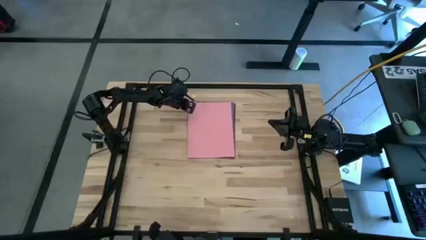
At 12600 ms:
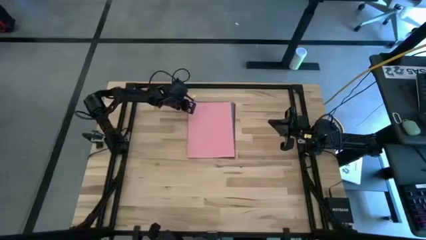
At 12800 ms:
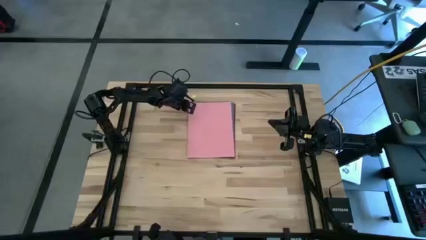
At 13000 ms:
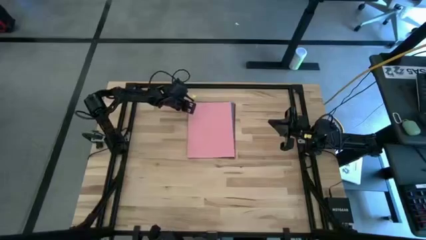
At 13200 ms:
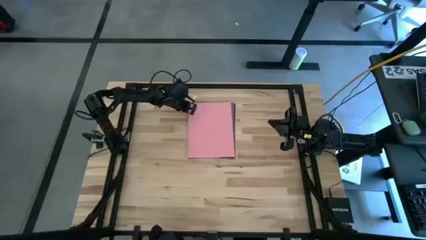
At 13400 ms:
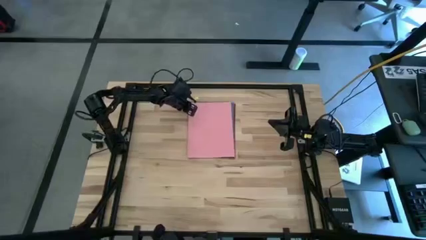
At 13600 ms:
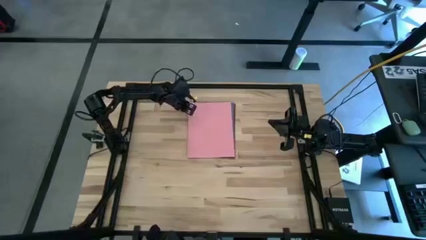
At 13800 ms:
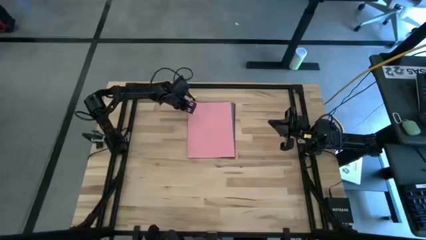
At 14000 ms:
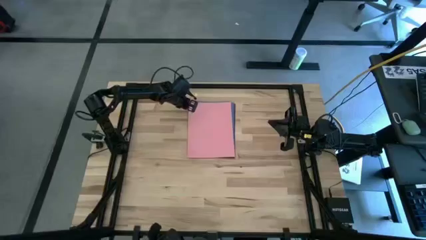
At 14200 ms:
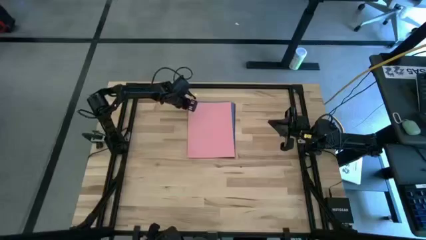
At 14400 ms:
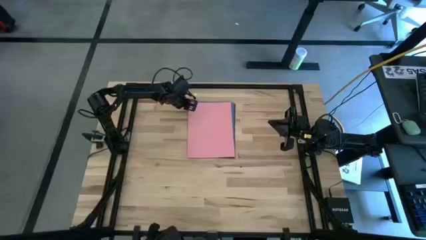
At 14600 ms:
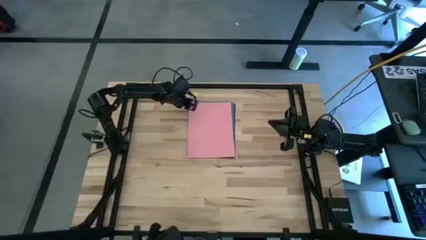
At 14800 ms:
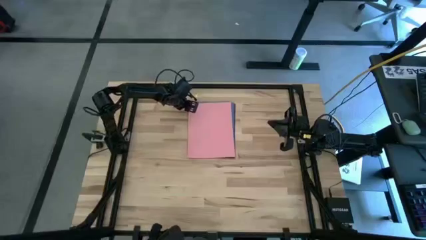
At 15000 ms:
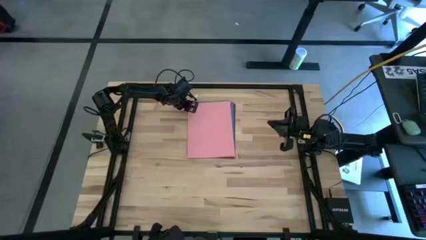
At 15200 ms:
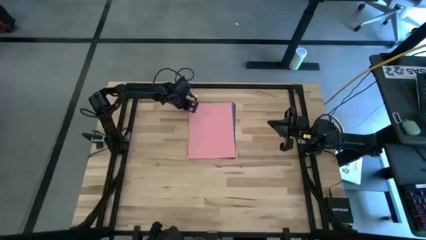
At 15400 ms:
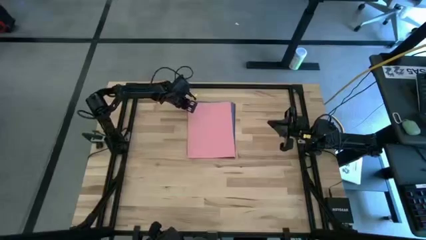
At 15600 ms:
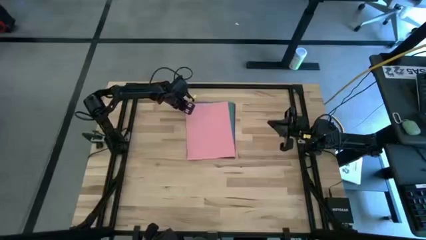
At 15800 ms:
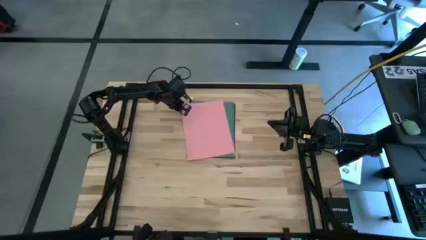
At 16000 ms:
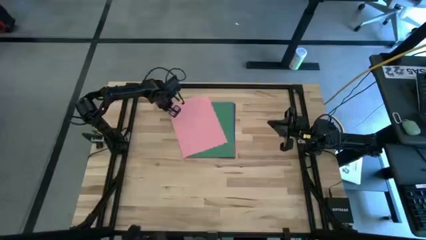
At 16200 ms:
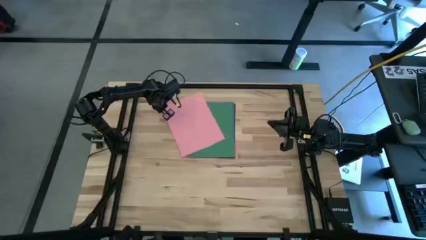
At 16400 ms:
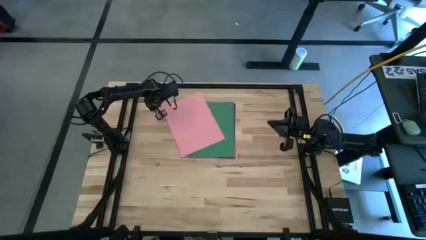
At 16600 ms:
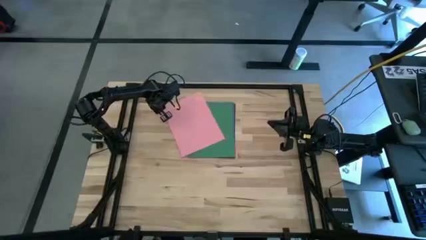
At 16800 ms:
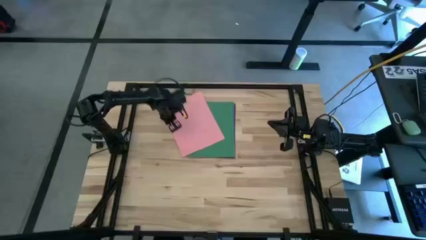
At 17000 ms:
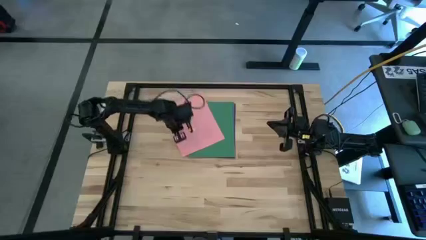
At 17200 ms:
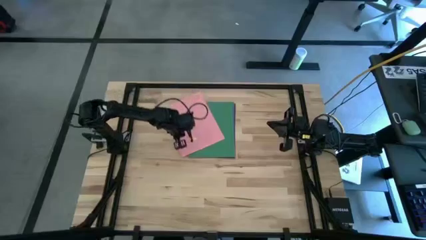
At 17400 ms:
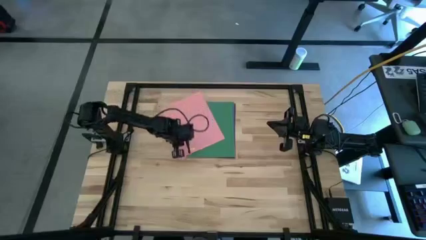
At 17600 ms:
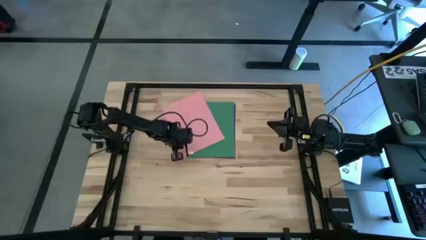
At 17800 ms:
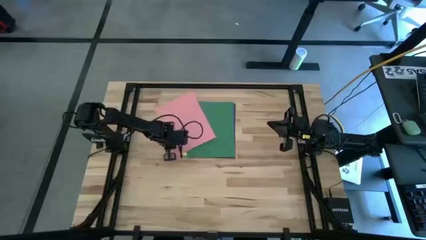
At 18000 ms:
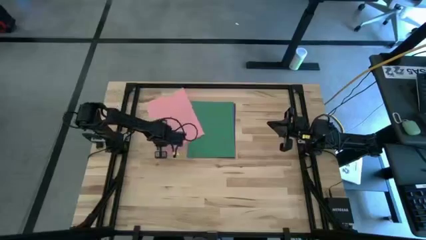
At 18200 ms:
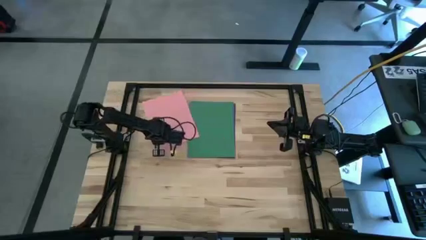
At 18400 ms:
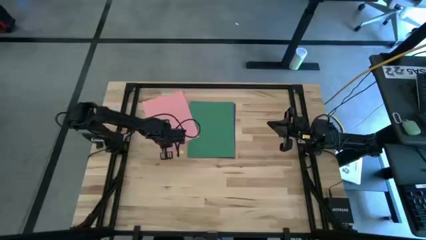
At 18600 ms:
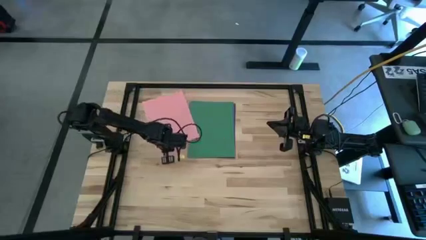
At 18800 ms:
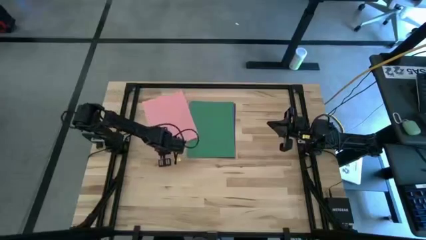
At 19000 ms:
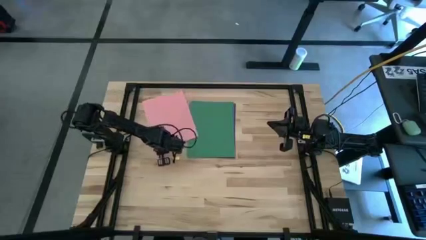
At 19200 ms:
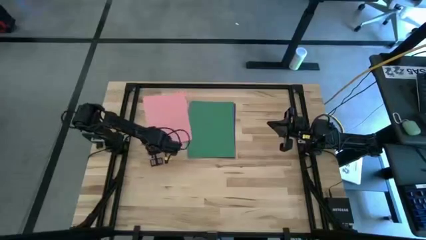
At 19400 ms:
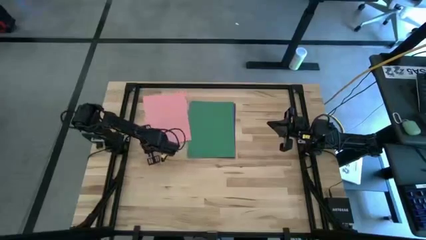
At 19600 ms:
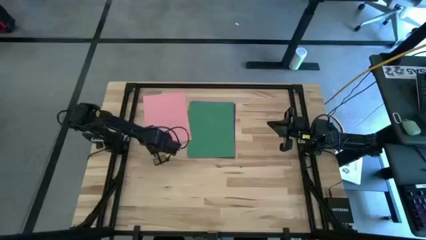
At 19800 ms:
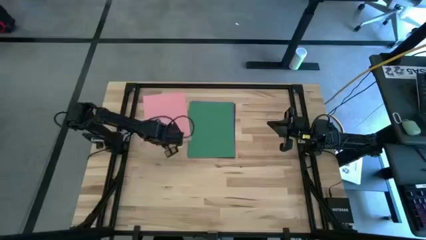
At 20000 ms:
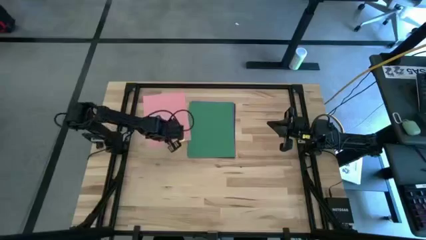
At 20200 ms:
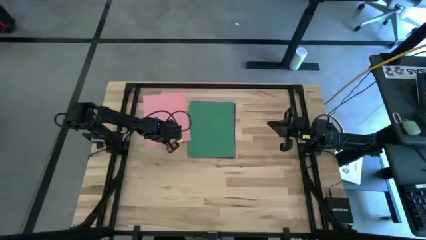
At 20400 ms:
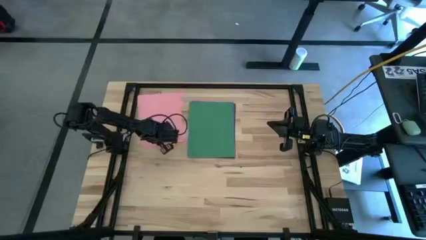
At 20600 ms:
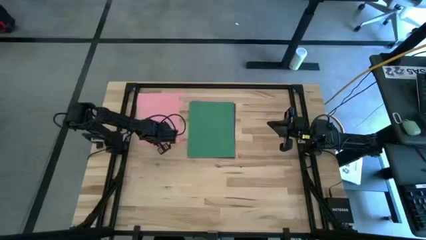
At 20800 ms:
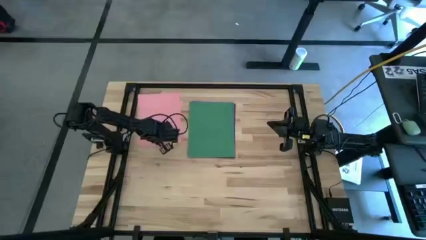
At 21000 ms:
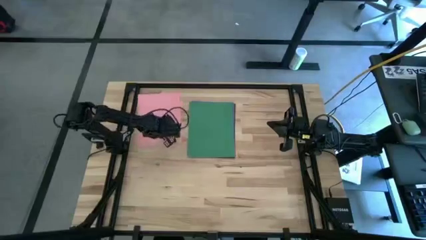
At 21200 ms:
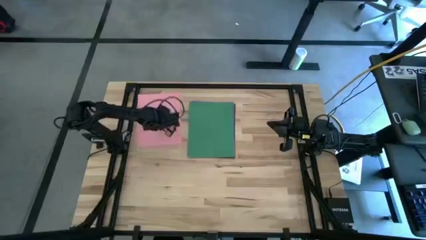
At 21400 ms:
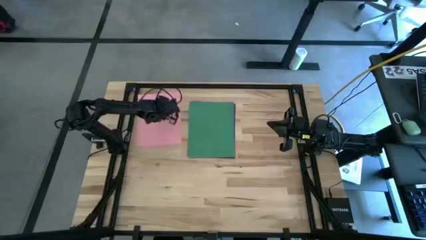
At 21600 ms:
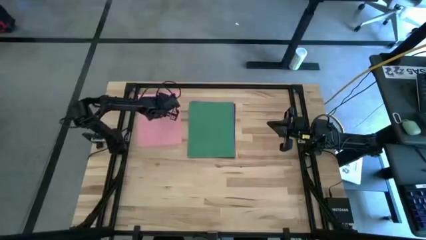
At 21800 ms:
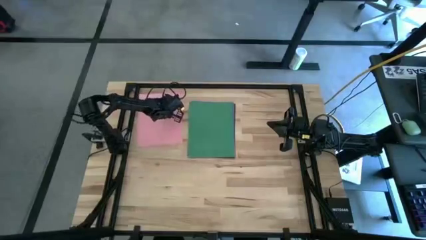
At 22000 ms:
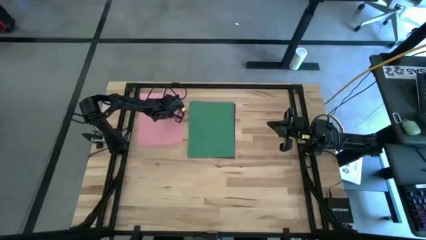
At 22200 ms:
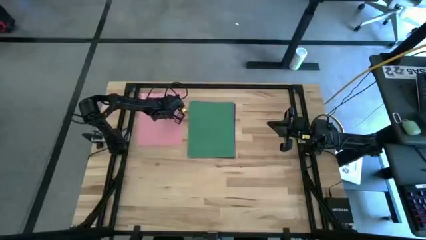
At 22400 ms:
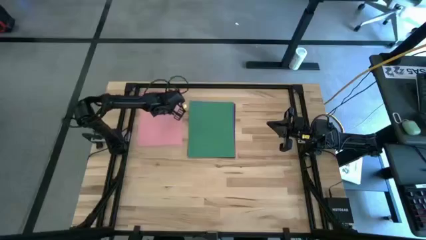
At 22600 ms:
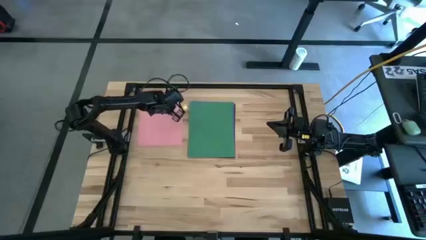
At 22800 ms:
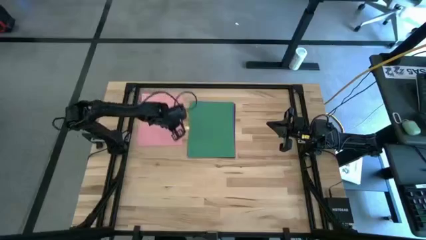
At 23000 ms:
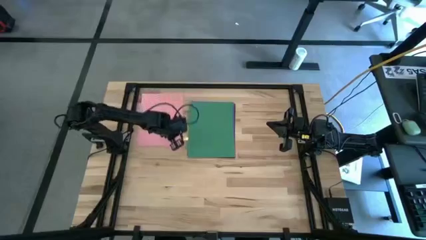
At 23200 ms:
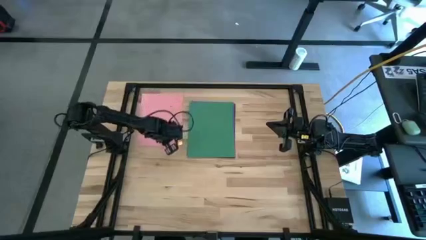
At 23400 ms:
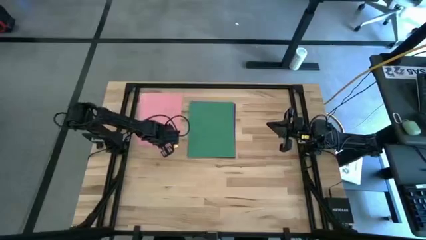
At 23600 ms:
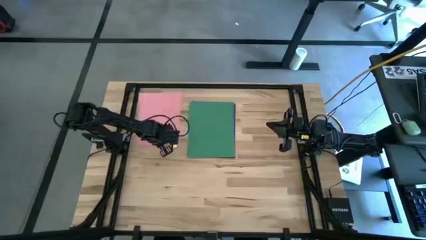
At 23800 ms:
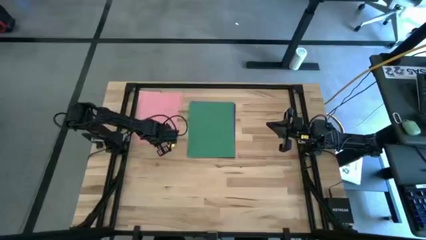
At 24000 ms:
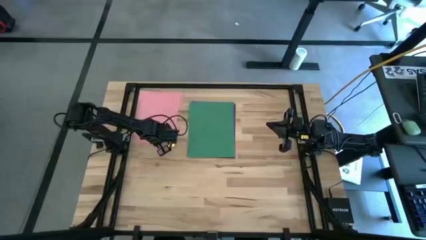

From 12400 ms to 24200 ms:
Task: Organize paper
Move the pink paper to the top left of the table

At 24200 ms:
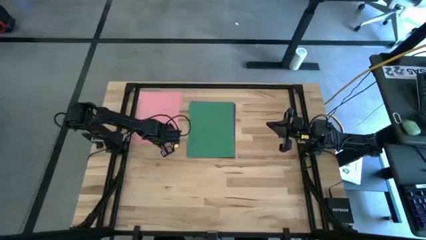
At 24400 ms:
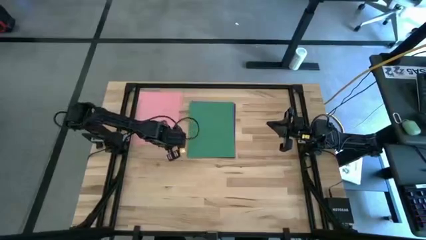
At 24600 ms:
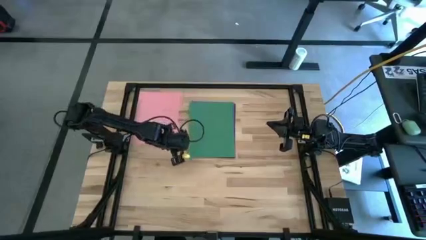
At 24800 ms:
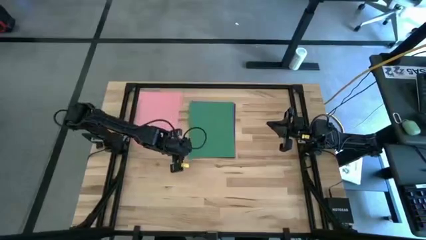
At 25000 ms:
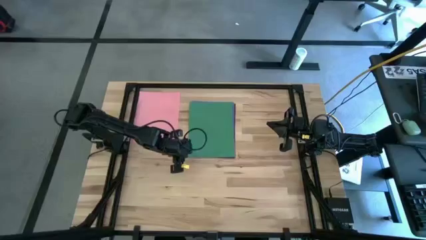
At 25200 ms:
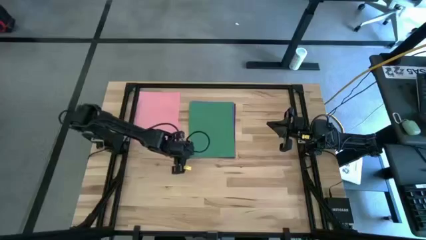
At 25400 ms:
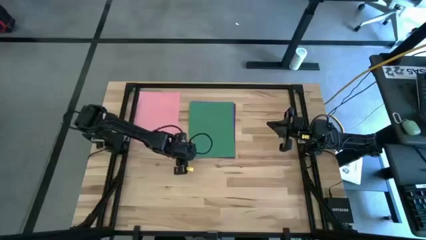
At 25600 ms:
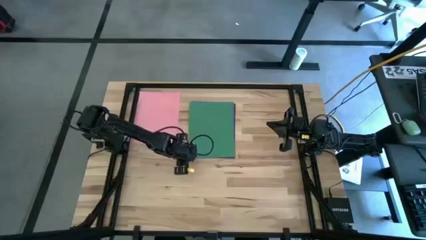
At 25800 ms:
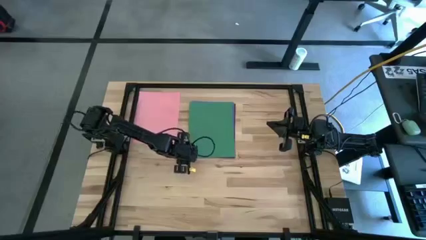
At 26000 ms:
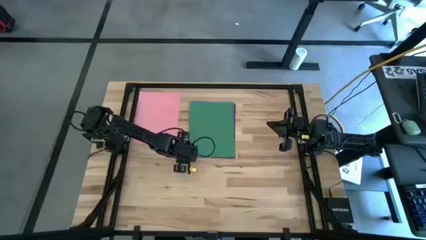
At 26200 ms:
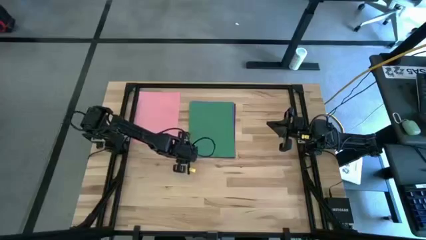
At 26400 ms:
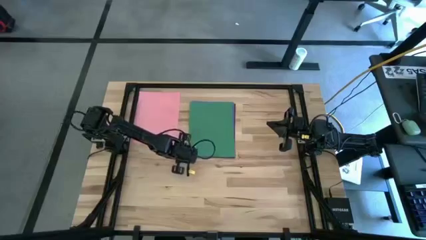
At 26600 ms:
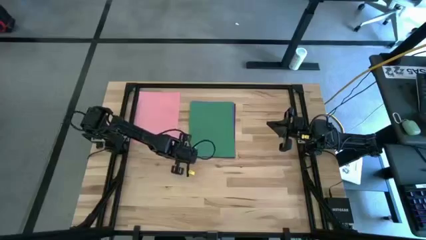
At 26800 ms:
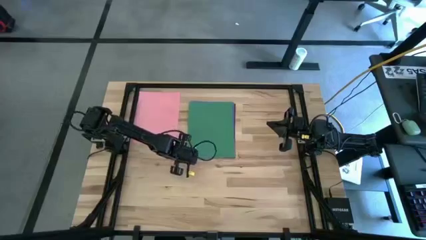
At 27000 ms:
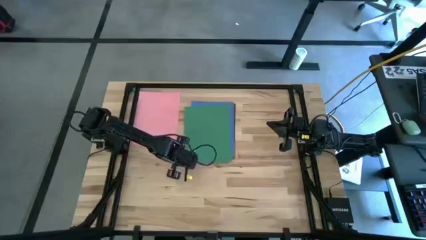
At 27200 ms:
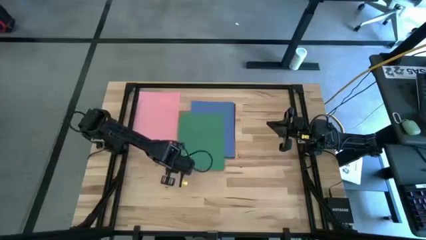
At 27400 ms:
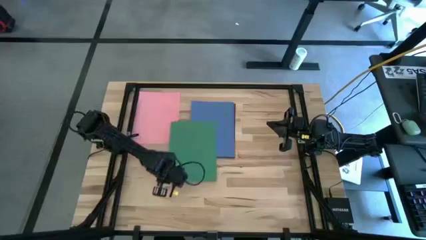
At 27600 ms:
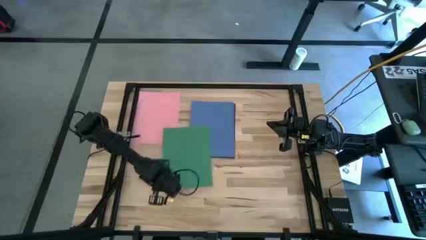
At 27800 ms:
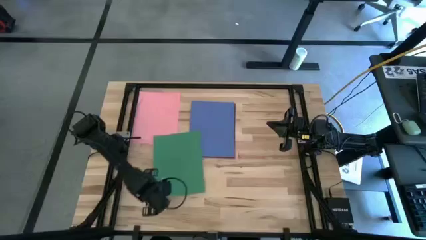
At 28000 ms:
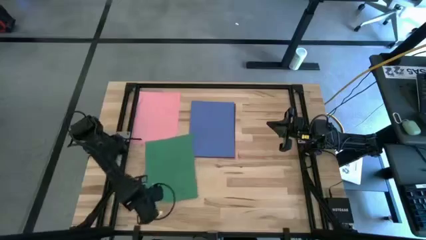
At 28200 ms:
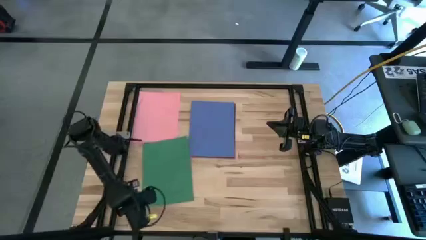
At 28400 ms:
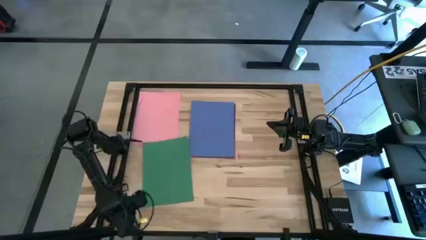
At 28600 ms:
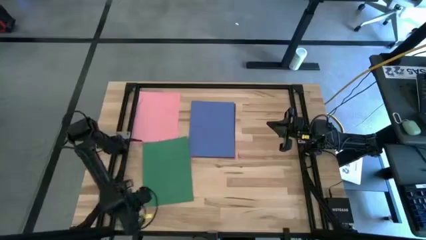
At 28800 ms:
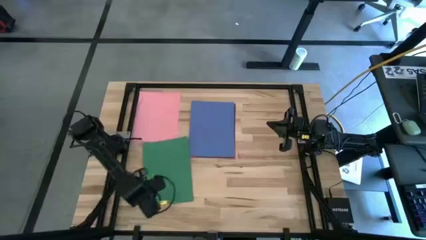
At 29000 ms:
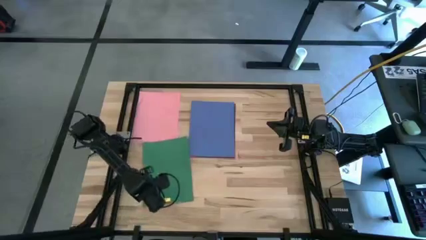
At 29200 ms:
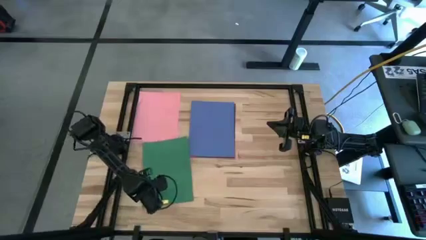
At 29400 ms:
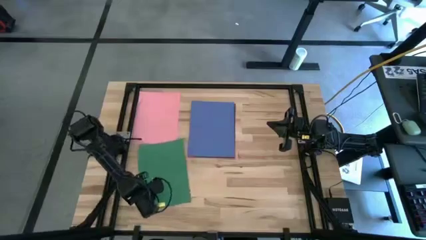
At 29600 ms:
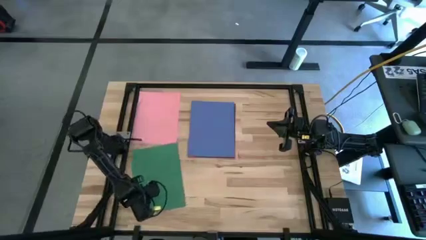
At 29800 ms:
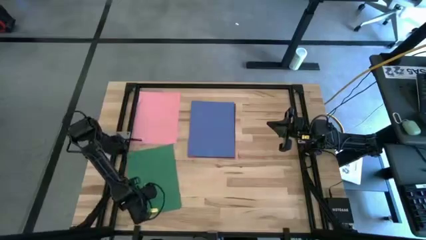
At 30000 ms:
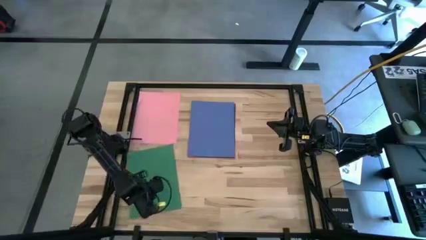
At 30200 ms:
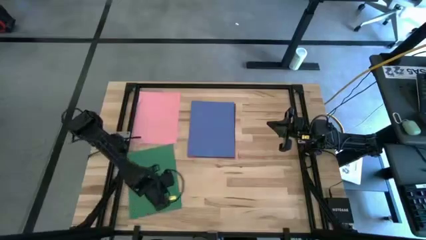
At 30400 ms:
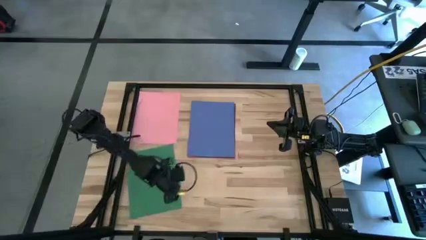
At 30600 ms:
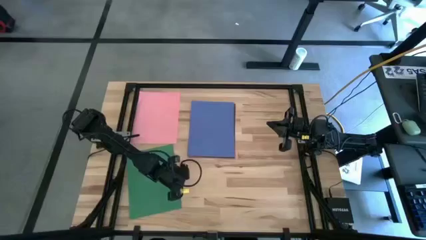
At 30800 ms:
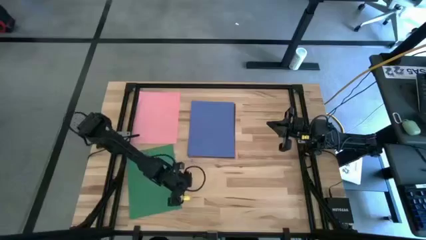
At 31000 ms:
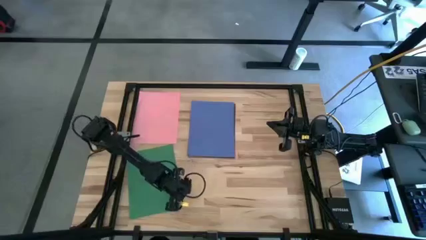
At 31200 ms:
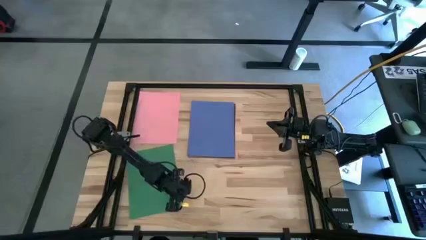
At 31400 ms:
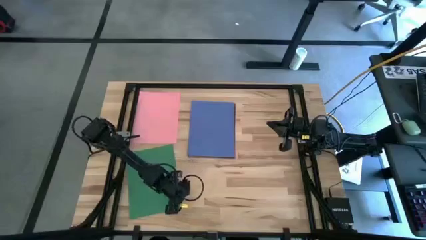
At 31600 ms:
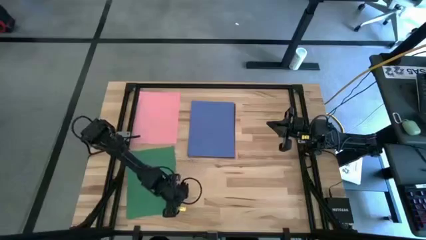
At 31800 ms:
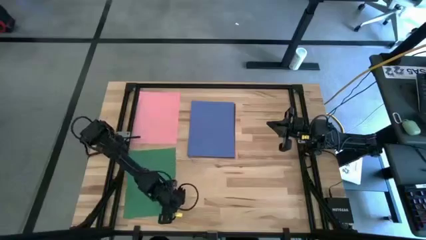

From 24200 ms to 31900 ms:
Move the green paper to the bottom left of the table
